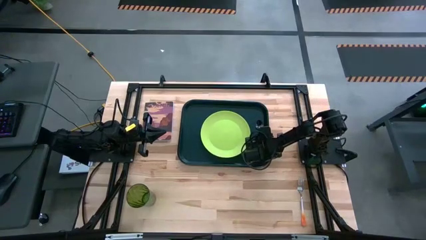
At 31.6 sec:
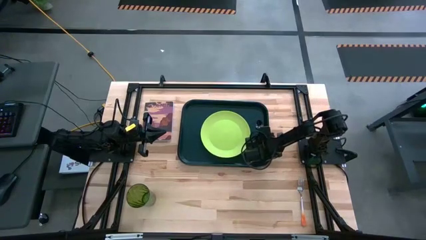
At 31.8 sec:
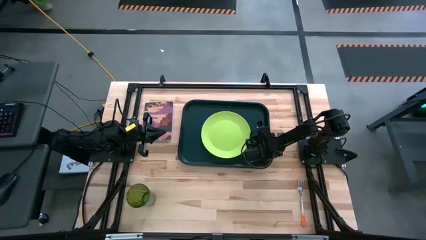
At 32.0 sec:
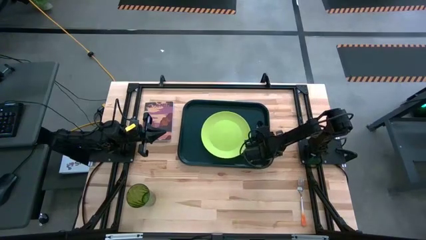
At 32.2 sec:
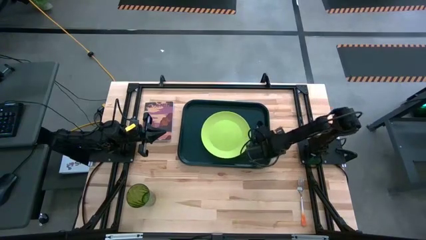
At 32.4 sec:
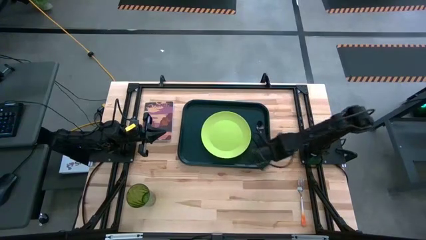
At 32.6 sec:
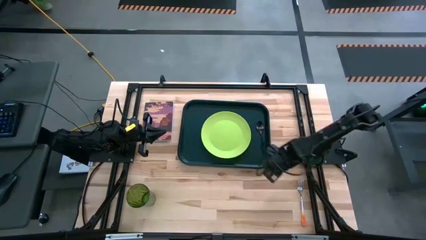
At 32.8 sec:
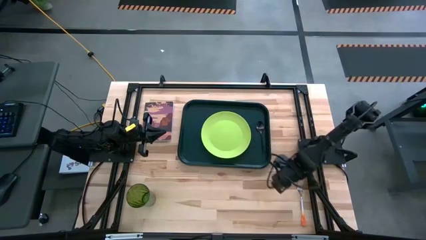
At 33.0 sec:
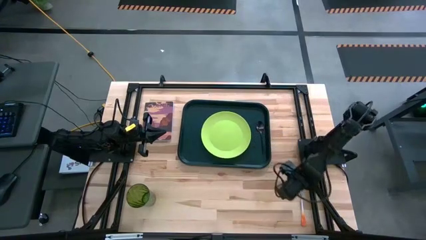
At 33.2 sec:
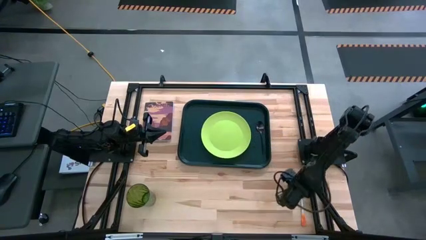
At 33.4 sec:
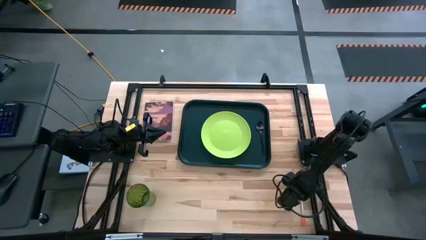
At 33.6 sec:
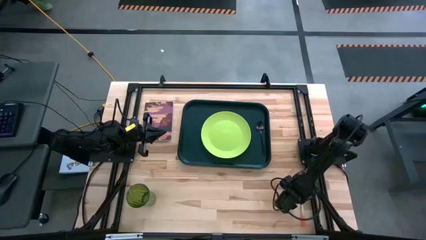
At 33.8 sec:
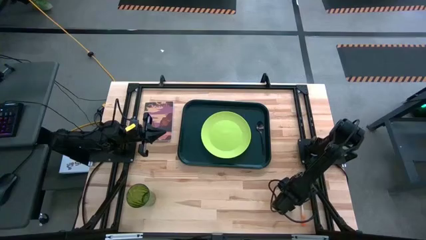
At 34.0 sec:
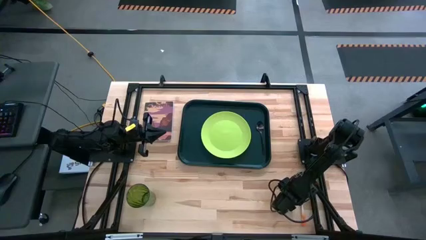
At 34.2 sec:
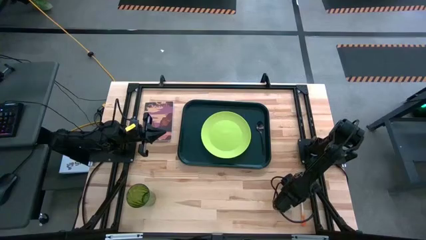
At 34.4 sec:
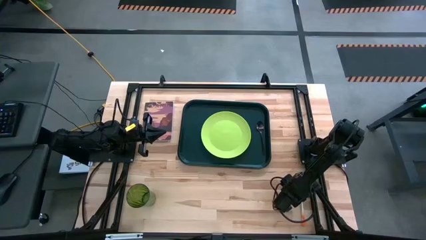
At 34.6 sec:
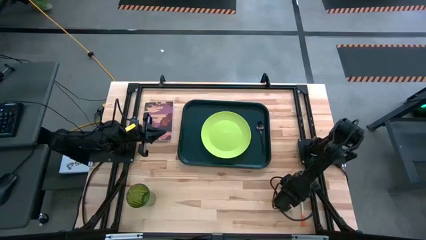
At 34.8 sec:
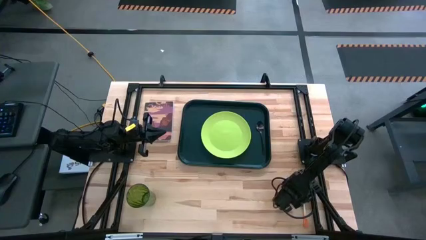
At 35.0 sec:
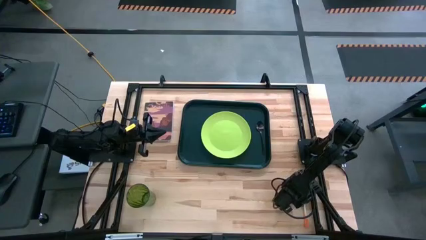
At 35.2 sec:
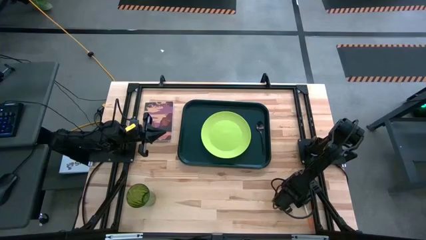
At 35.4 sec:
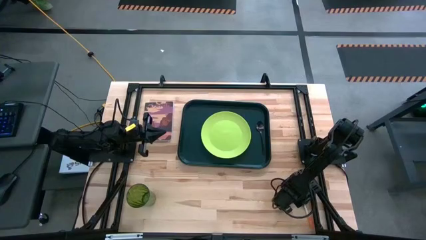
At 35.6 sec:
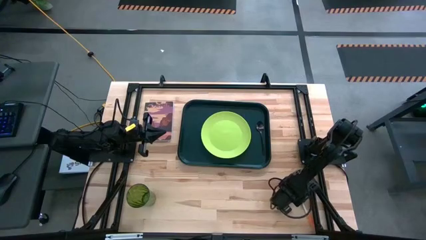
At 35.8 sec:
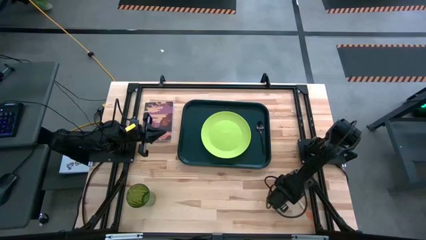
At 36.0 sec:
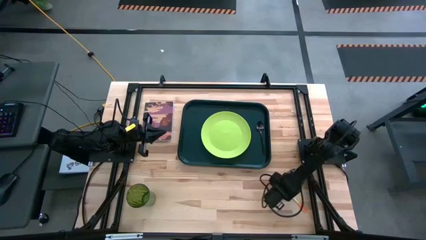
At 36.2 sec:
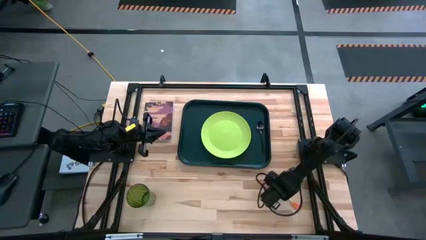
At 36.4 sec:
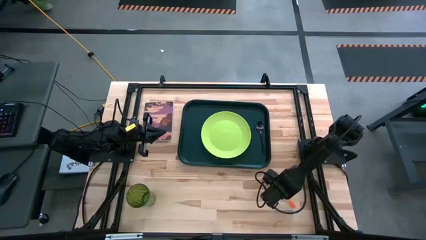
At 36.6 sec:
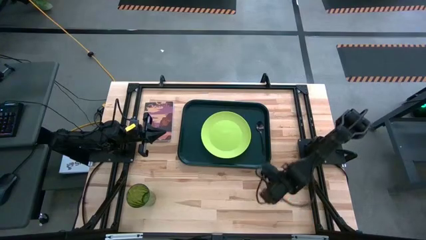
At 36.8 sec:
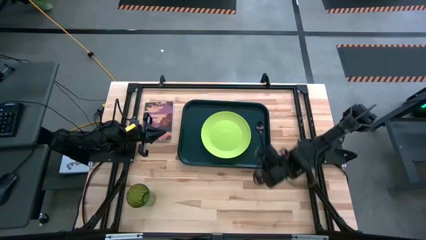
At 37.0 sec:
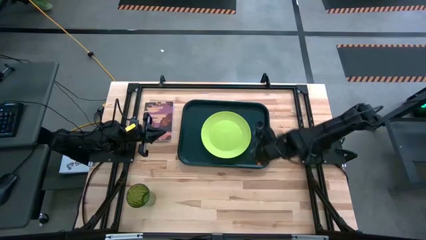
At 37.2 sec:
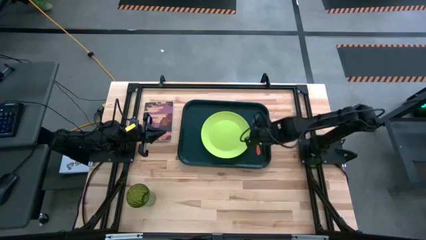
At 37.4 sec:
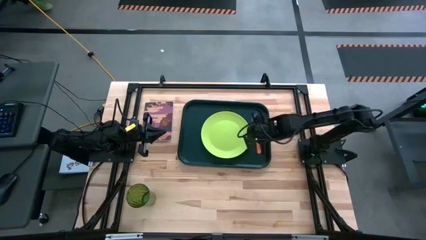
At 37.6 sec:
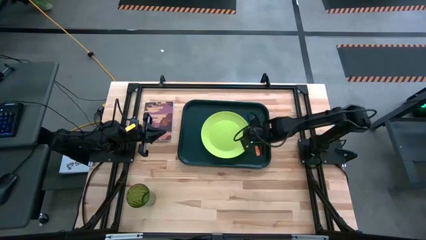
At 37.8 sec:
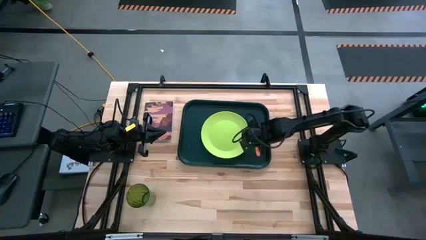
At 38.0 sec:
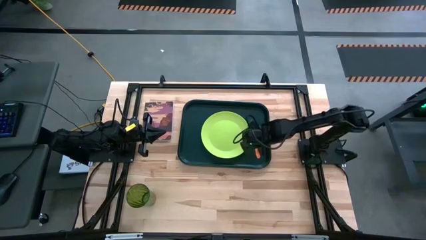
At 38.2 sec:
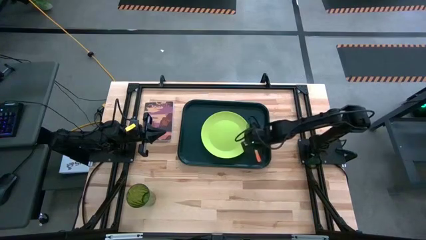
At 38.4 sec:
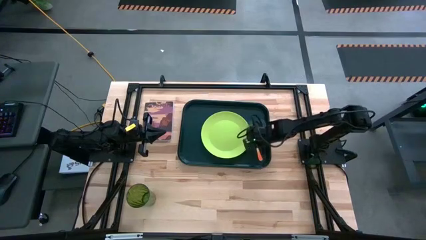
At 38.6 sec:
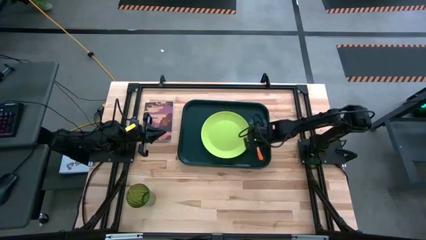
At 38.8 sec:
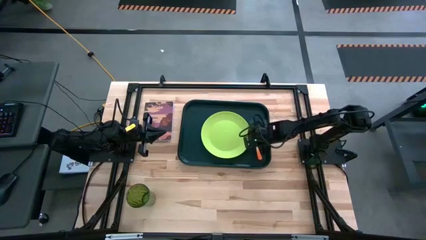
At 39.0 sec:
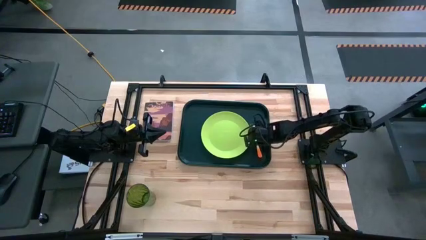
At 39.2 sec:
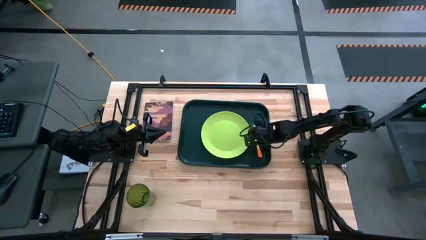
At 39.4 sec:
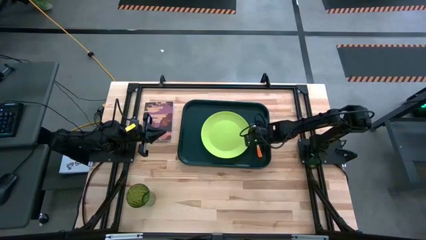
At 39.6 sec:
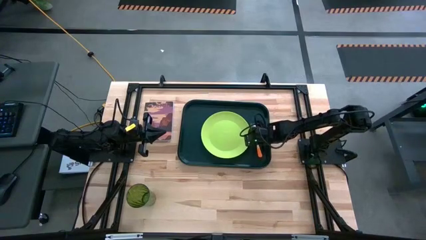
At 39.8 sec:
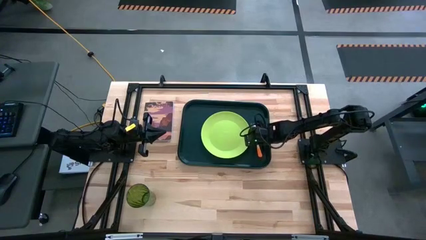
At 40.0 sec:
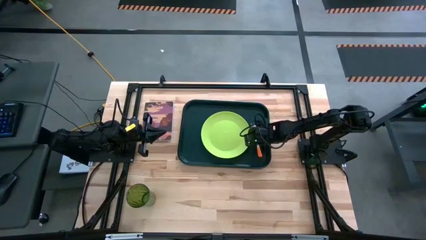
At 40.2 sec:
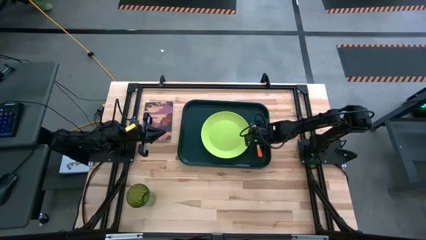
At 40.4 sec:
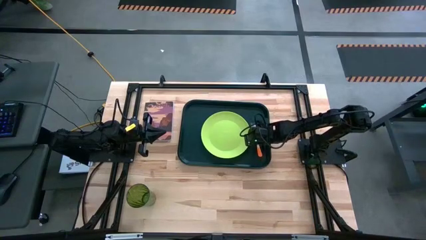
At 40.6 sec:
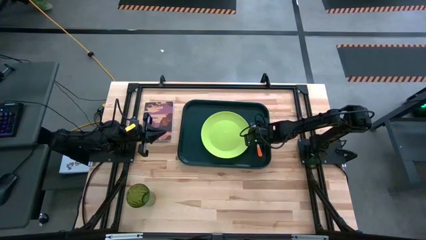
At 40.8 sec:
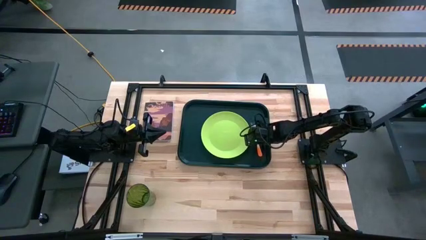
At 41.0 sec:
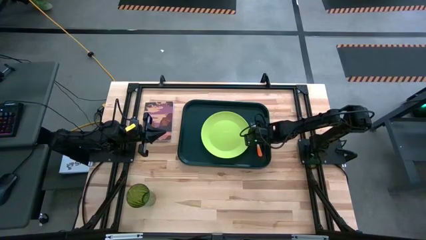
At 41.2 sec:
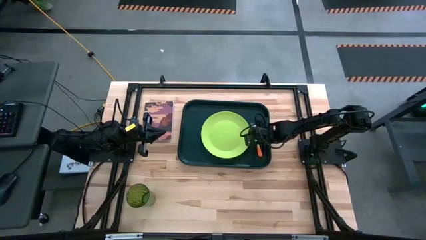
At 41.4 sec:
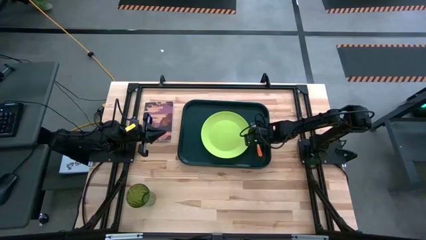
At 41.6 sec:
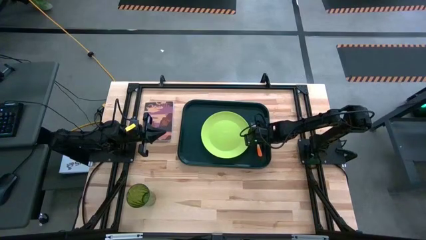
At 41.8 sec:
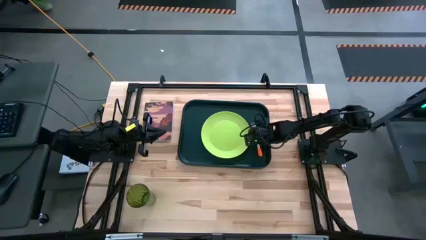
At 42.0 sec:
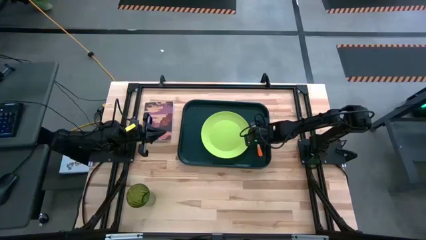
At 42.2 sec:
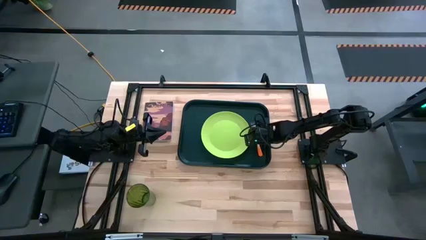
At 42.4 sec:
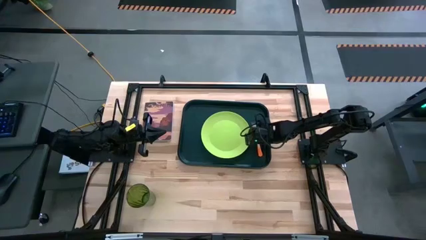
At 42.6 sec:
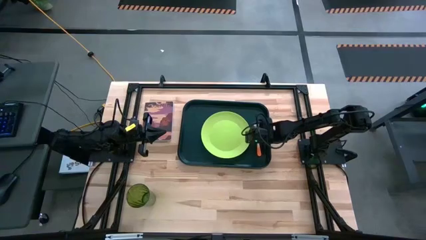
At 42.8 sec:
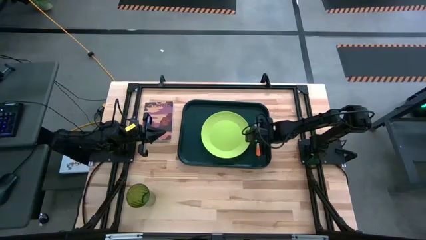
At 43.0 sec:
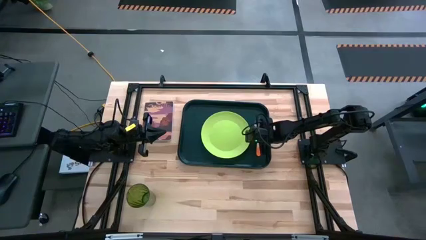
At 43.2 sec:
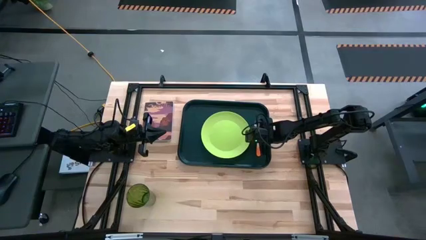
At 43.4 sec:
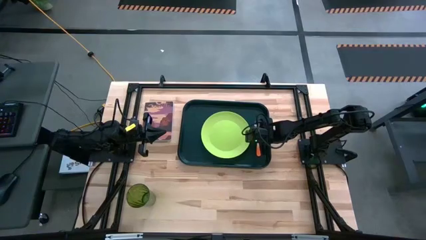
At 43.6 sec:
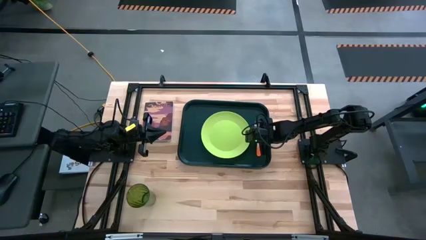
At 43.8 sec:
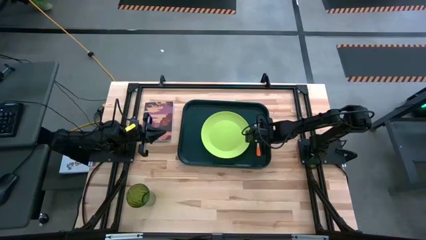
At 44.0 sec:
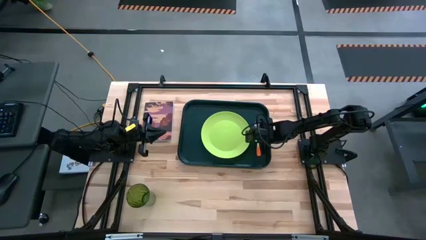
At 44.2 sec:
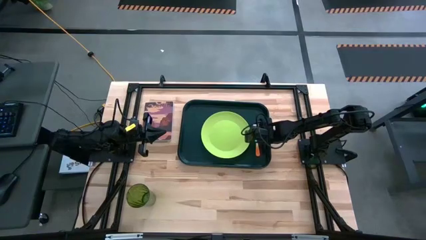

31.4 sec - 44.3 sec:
Task: Pick and place plate/cup/fork/spoon on tray
Put the orange fork on the black serving tray to the left of the black spoon
